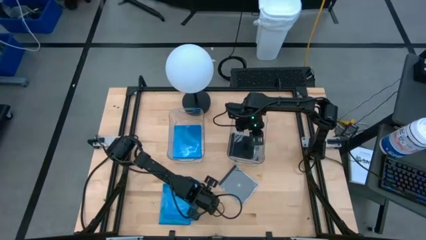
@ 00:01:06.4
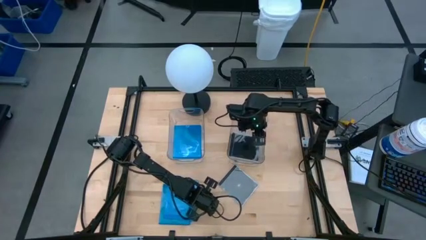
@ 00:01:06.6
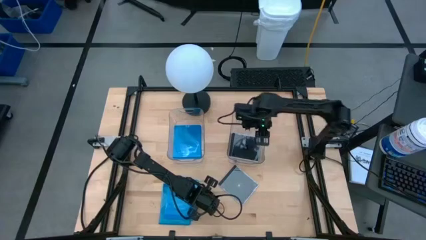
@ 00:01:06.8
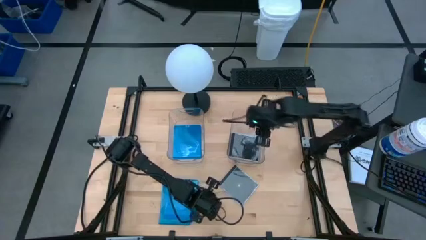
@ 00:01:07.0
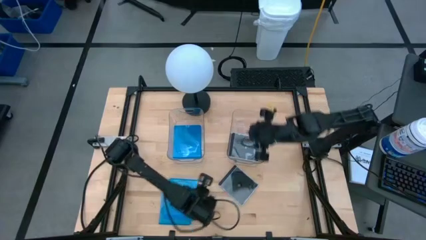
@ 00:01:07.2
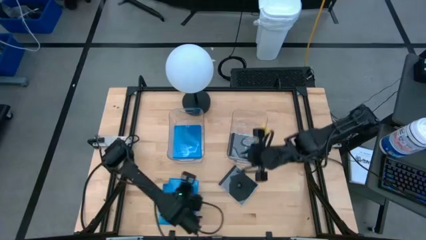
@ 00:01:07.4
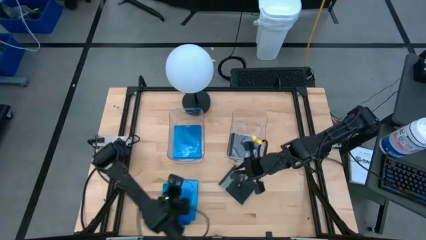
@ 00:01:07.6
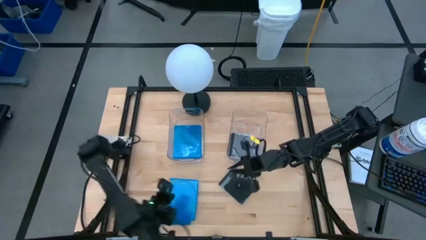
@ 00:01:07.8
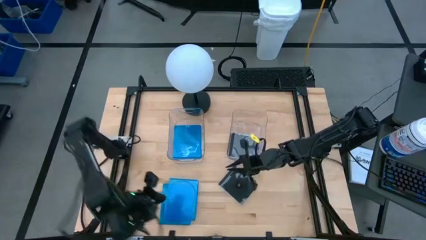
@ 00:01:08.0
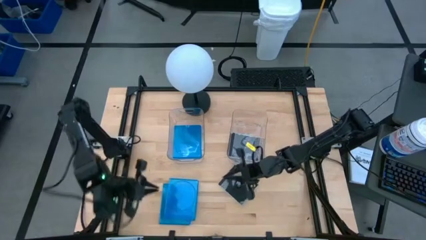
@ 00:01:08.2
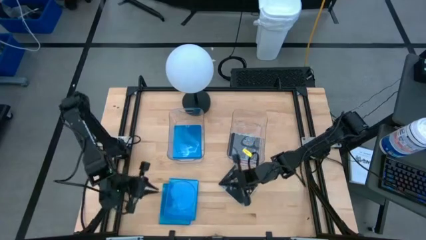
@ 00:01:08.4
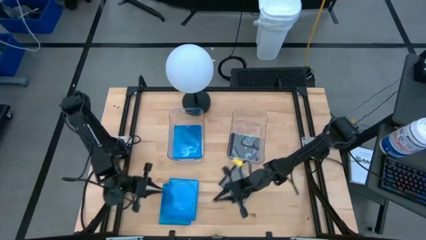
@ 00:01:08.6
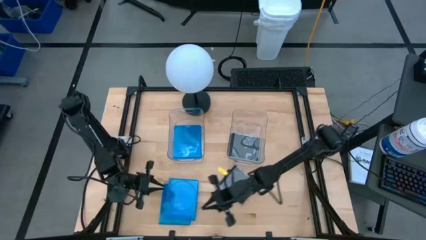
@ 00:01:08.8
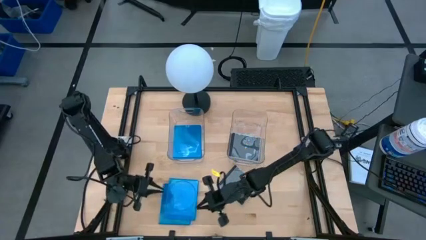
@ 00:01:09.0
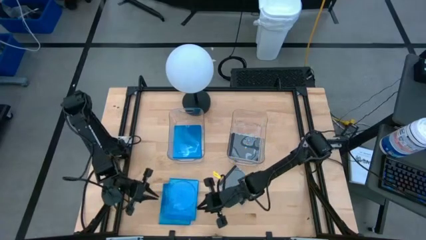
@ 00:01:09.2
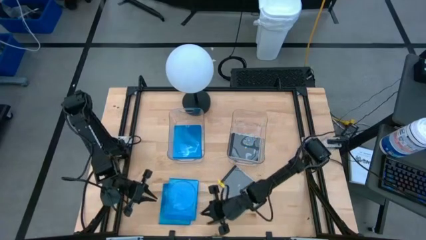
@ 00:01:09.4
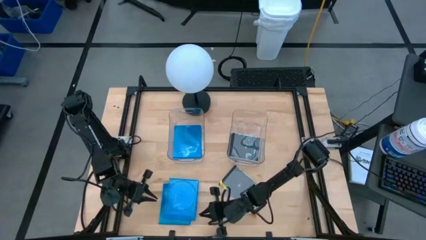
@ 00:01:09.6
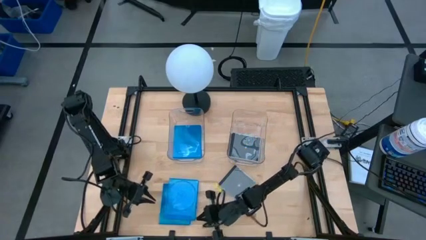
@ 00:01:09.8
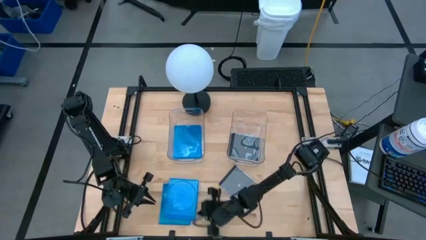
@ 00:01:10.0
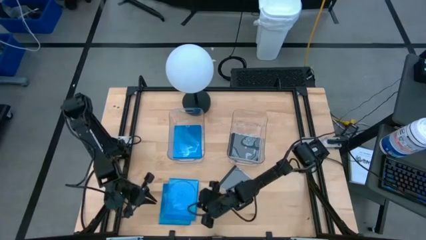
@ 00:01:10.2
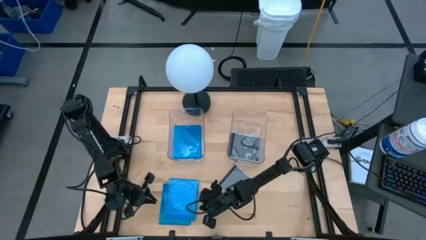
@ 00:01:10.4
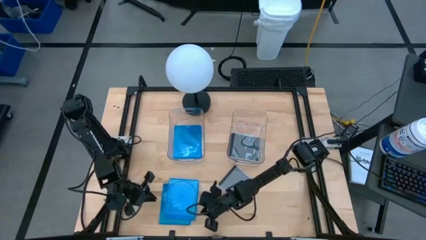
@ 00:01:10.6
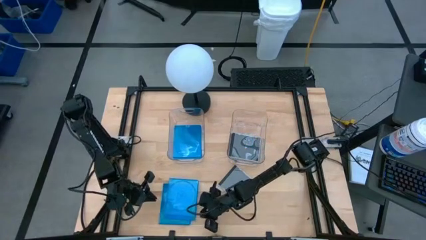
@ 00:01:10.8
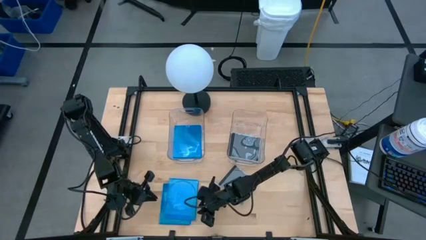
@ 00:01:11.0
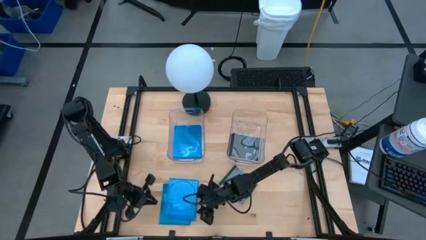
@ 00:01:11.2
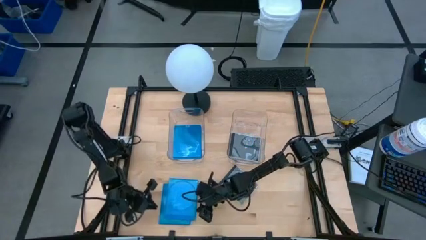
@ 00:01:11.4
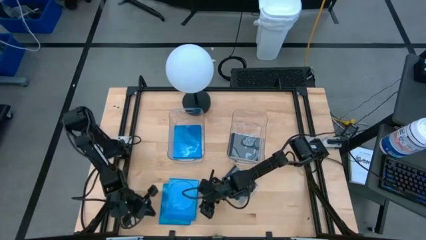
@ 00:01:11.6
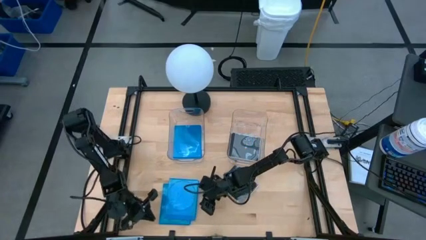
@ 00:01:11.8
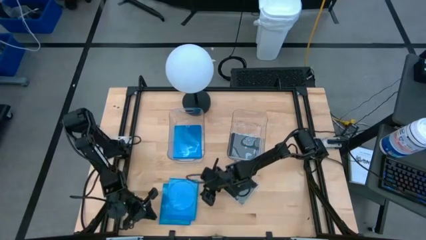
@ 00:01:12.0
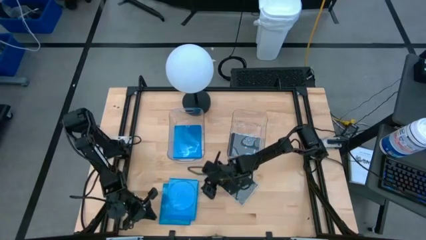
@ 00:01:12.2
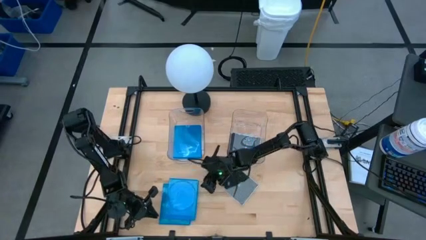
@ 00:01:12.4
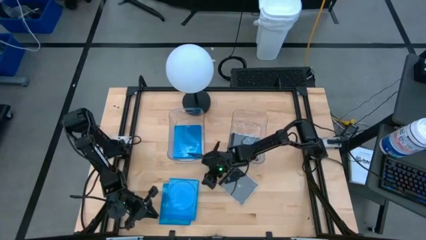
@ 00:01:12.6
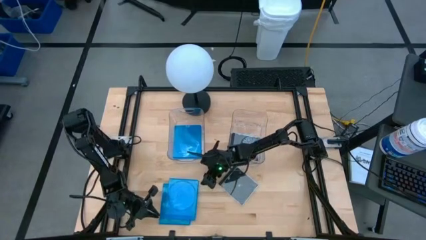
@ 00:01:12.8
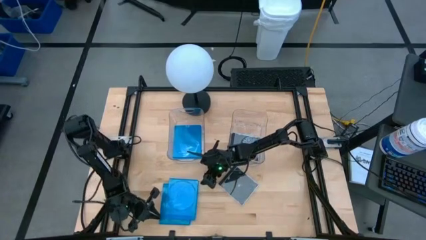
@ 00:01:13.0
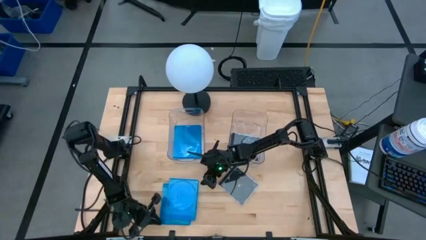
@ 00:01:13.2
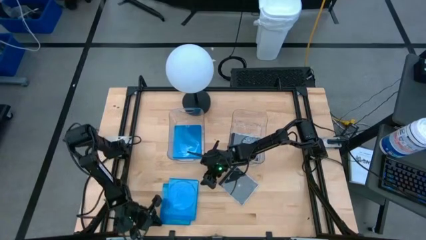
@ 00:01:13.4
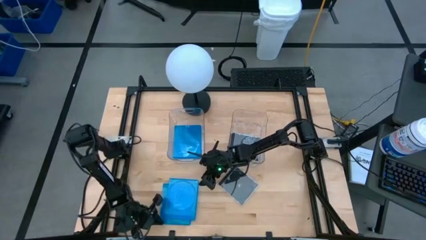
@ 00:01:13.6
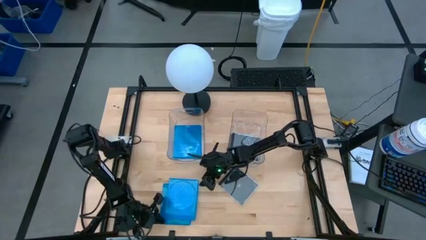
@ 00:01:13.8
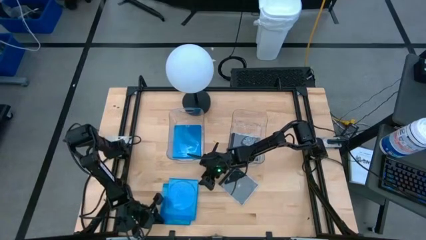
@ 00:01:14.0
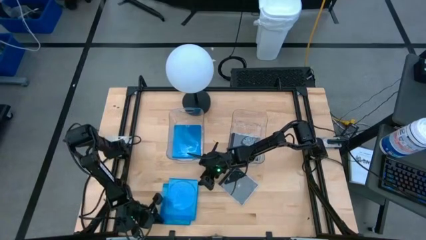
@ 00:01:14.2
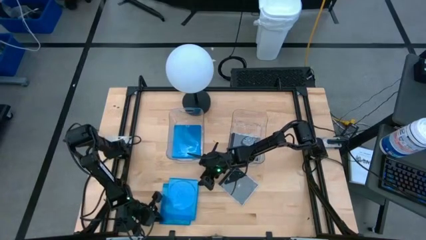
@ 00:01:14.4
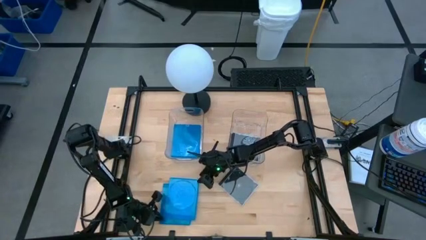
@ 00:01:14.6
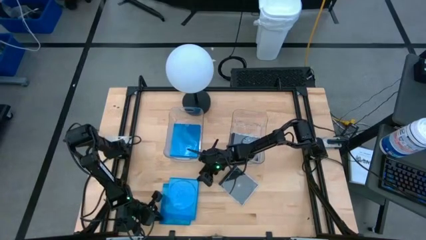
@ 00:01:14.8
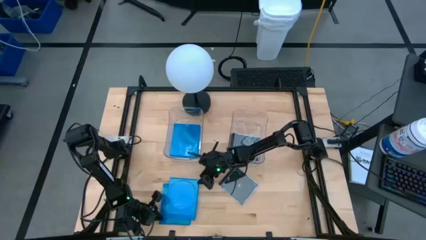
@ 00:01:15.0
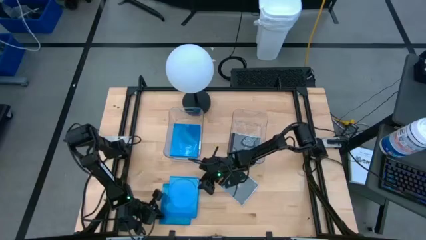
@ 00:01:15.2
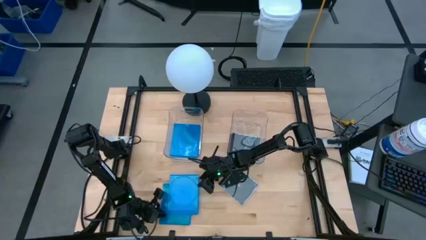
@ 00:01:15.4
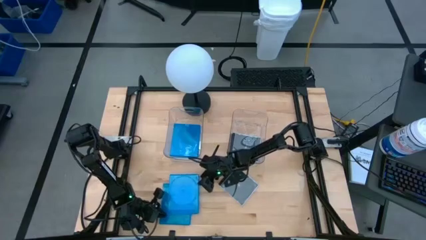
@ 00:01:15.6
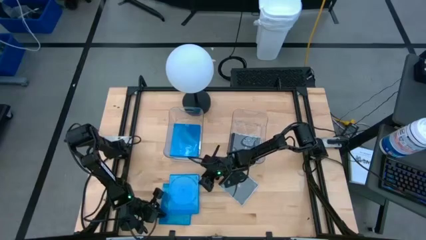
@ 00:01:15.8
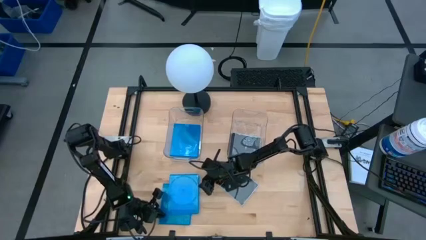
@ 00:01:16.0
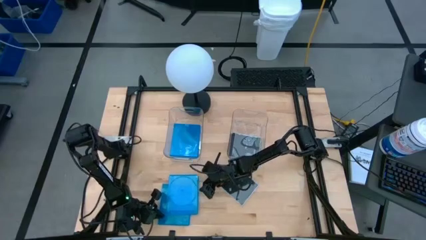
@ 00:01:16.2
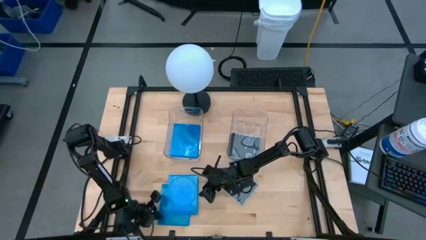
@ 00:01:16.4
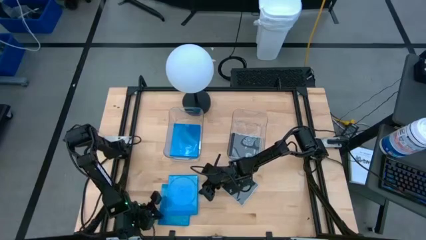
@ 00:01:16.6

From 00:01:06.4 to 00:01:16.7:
Task: Pick & place jewel cases by type
Put the blue CD case into the left transparent bin
